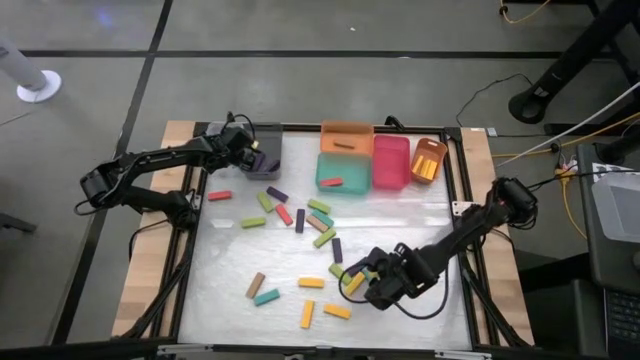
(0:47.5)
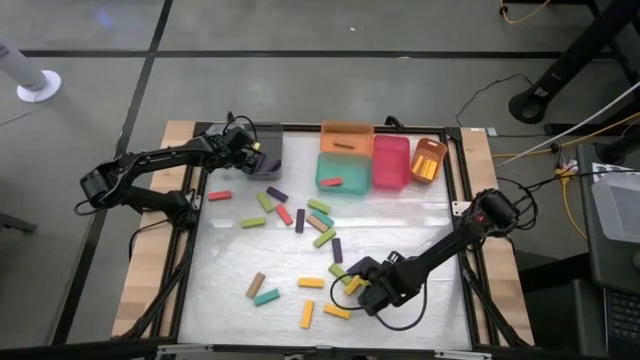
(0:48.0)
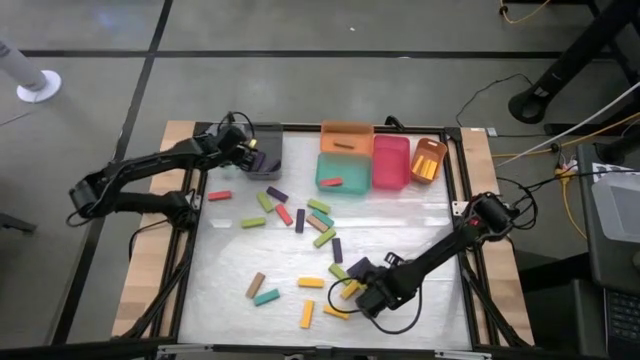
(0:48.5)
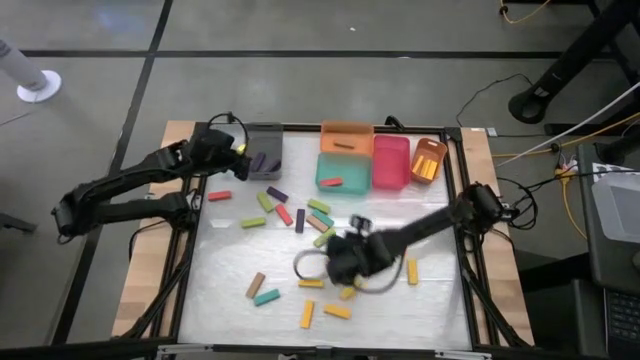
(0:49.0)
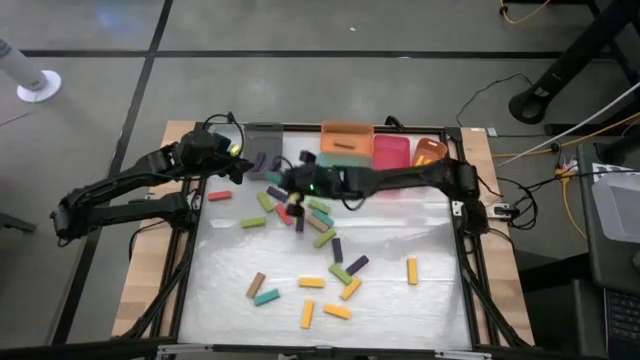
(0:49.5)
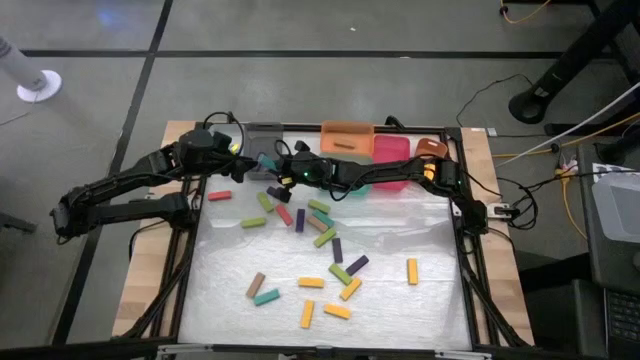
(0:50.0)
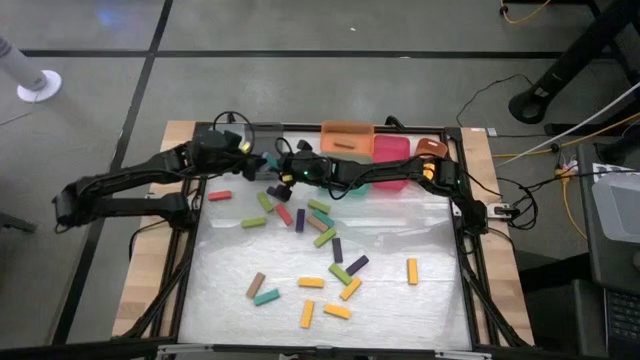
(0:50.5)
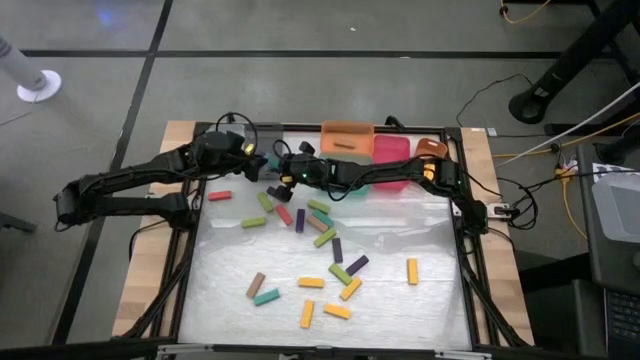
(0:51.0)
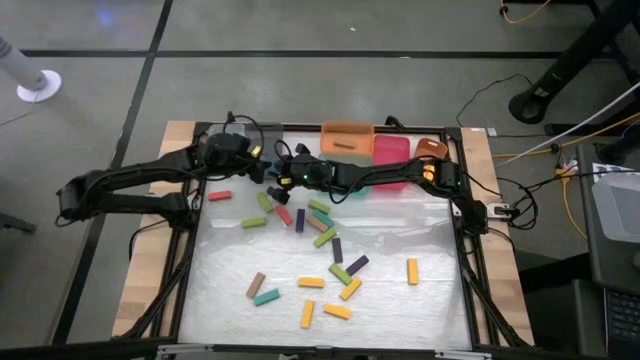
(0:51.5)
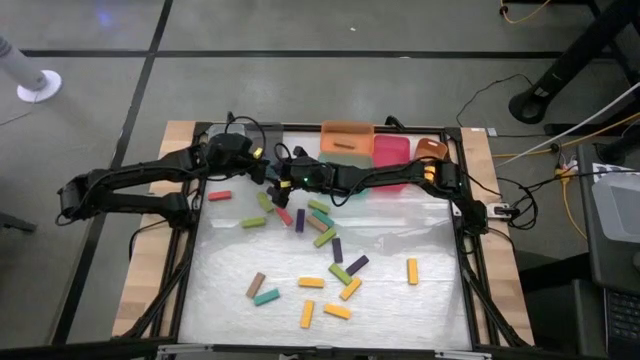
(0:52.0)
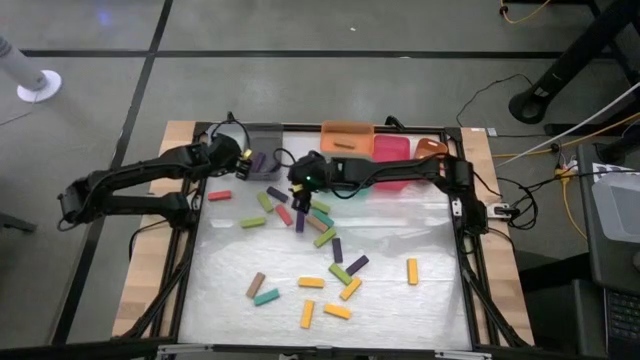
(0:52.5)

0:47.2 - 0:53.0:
Task: Sort blocks
Put the light blue block into the transparent bin

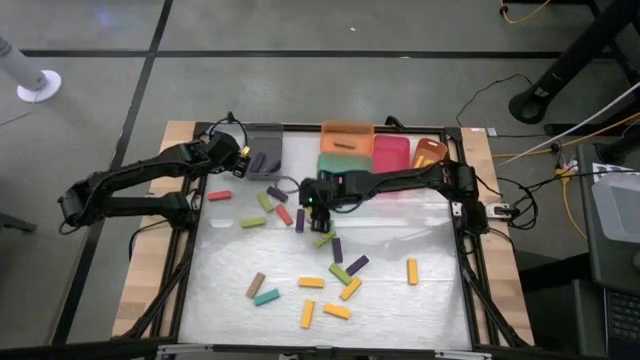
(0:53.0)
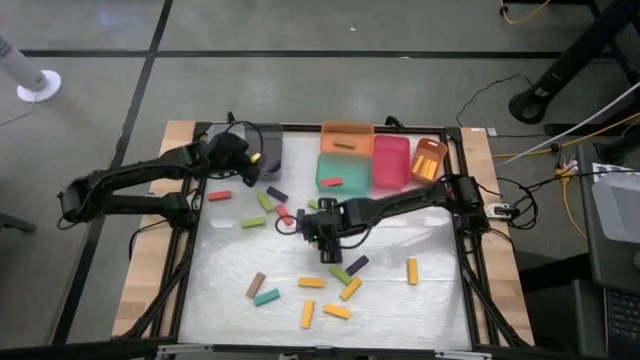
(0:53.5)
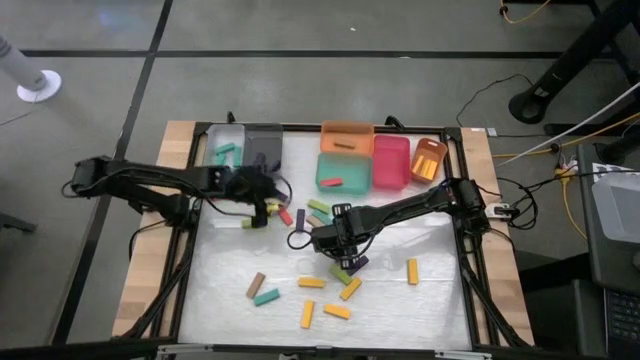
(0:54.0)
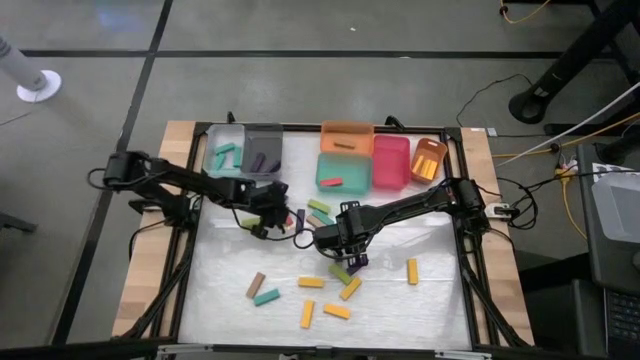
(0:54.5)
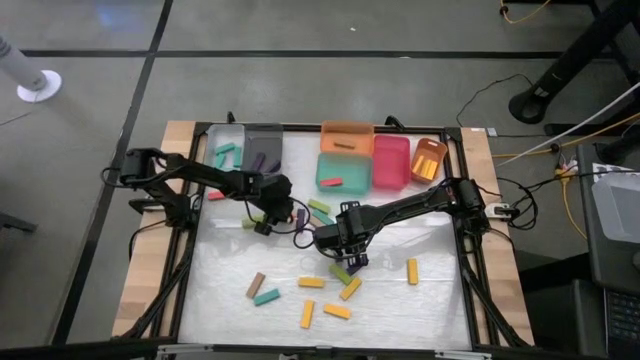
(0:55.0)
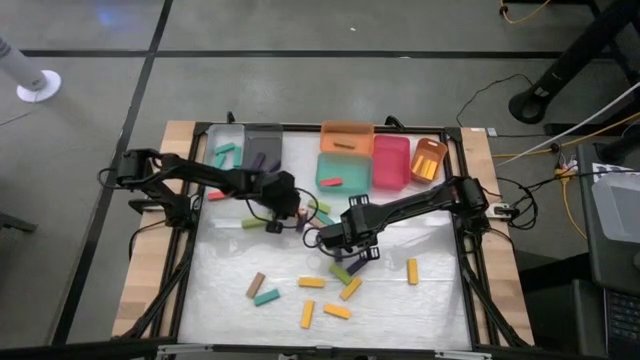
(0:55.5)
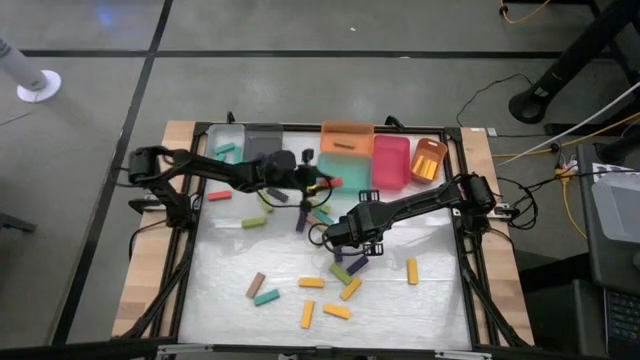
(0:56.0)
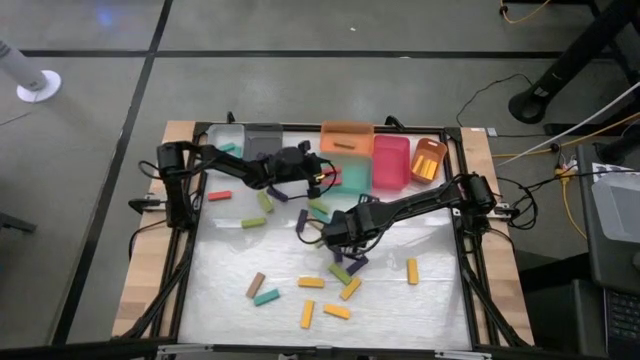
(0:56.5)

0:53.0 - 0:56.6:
Put the orange block into the light blue bin

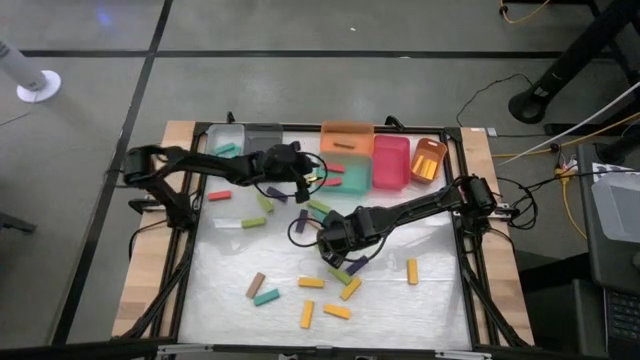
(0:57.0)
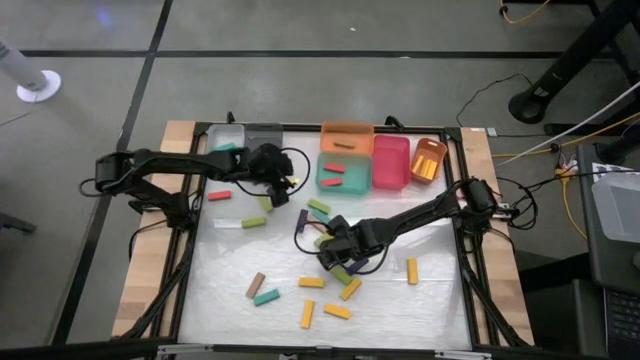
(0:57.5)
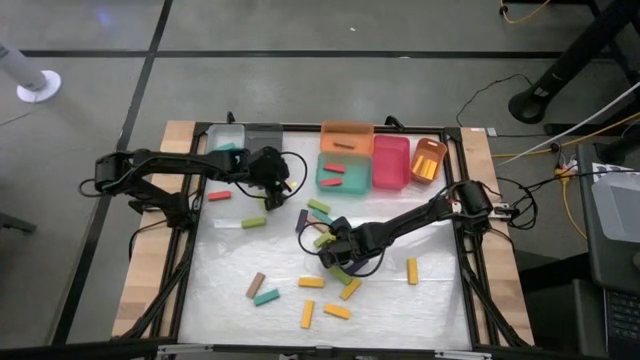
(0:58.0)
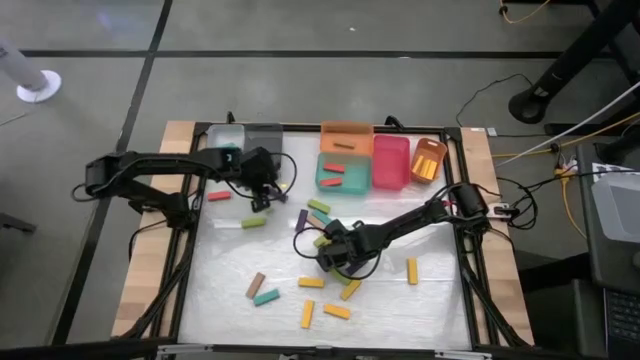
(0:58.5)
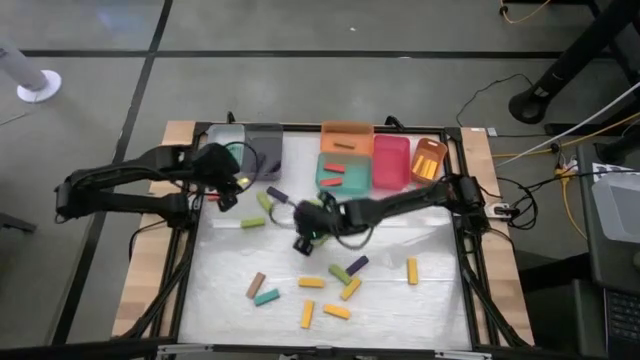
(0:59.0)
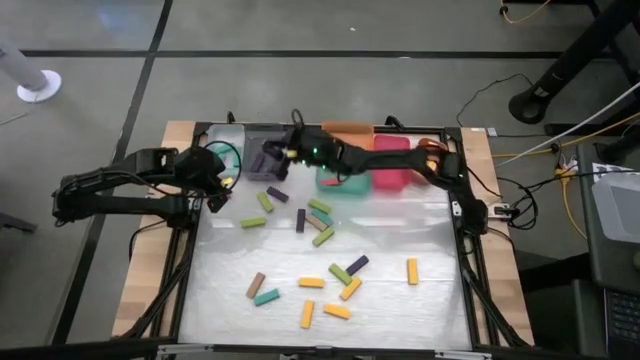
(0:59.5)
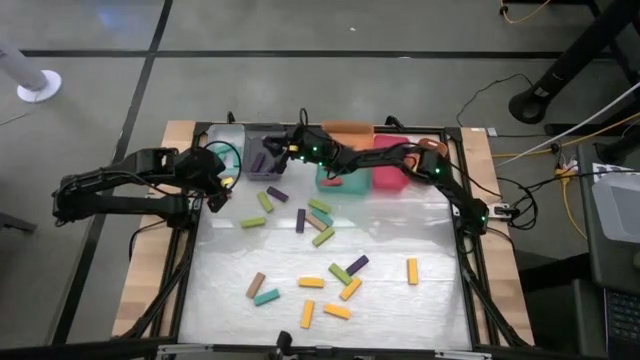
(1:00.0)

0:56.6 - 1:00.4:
Put the violet block into the black bin

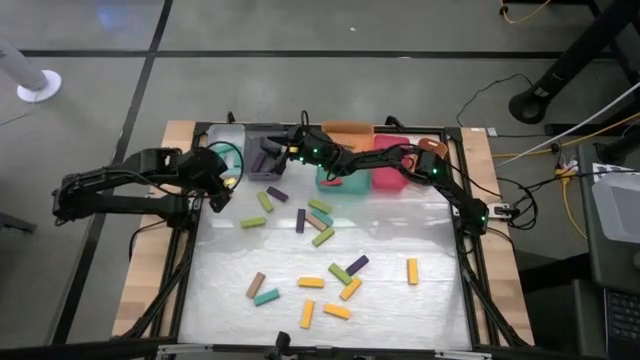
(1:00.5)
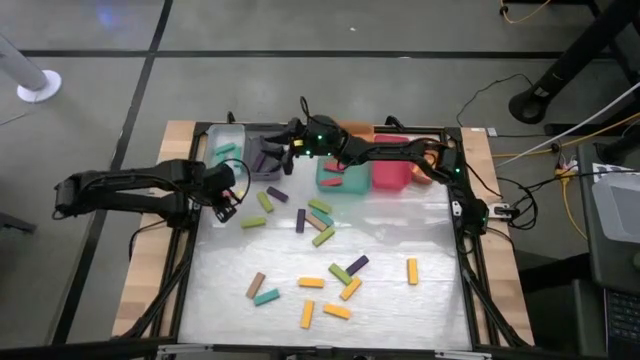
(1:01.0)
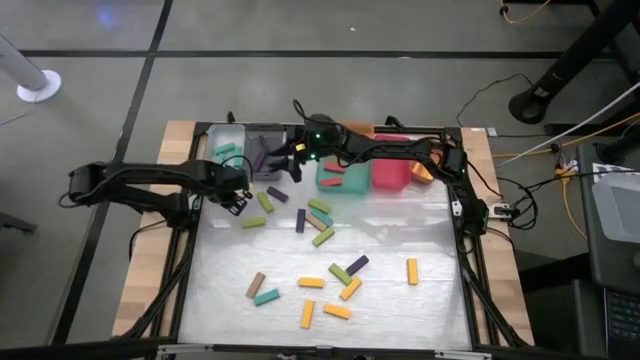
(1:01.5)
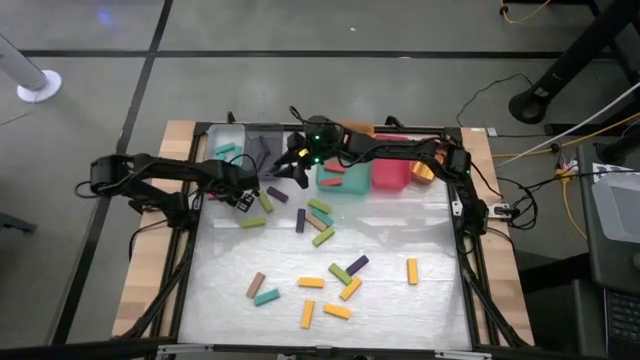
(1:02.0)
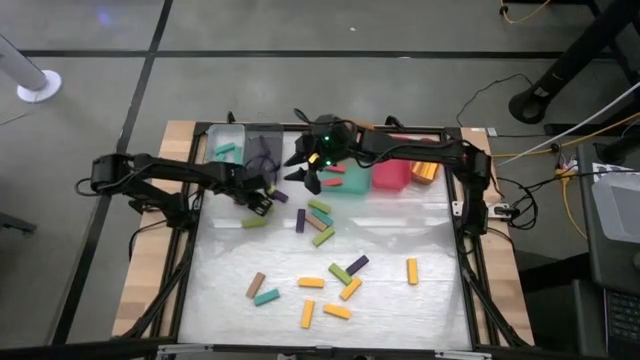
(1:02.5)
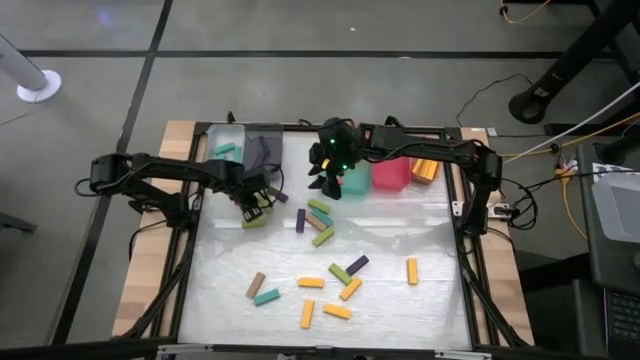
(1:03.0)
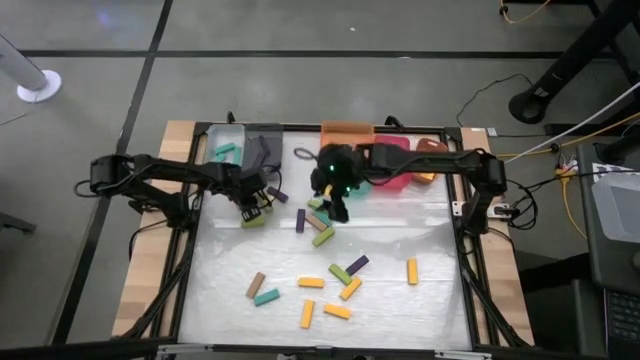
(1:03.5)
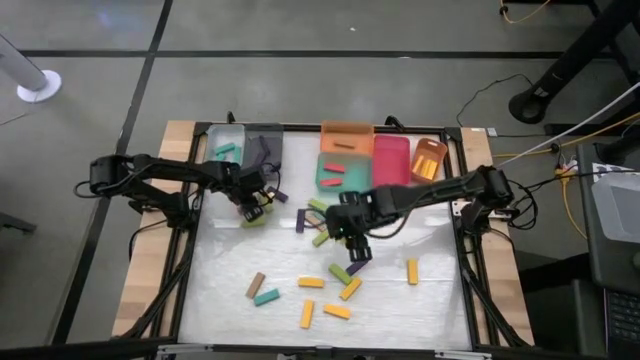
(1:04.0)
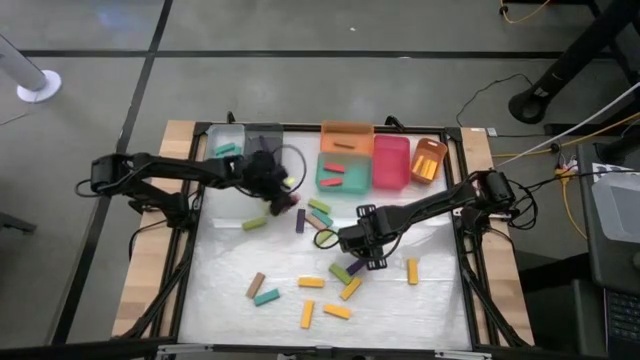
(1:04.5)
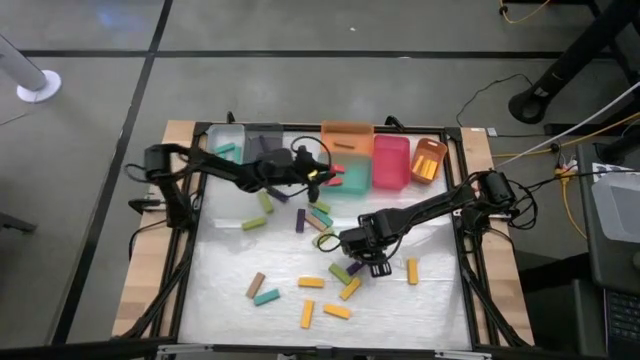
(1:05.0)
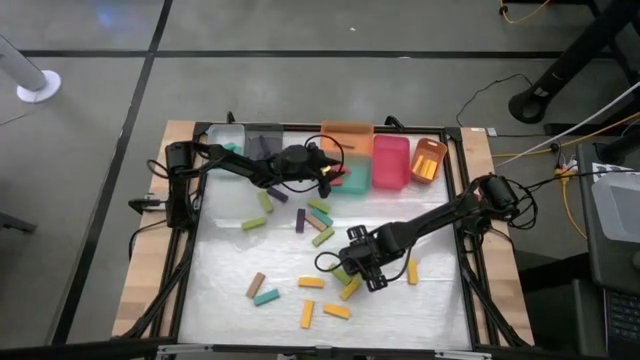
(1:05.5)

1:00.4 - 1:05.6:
Put the orange block into the light blue bin

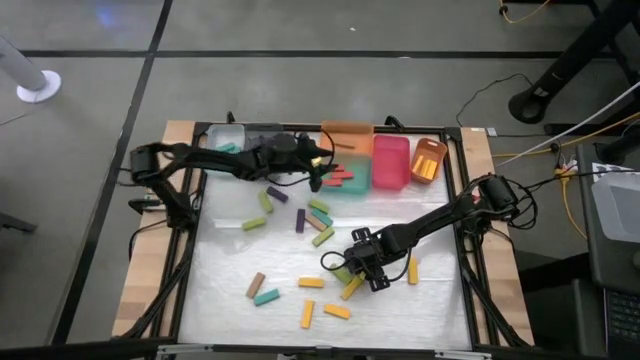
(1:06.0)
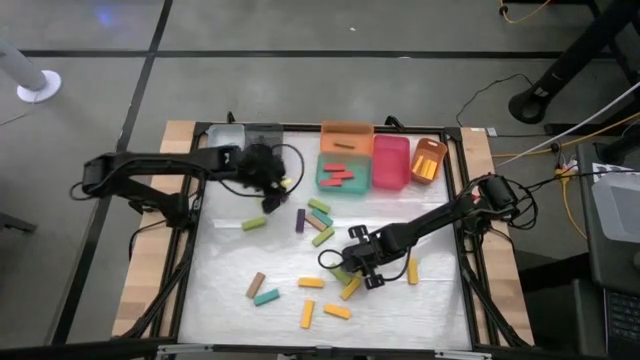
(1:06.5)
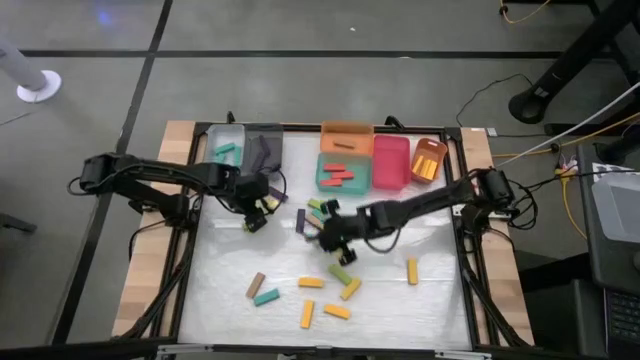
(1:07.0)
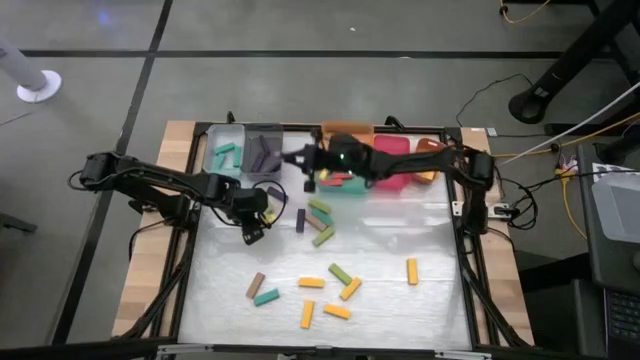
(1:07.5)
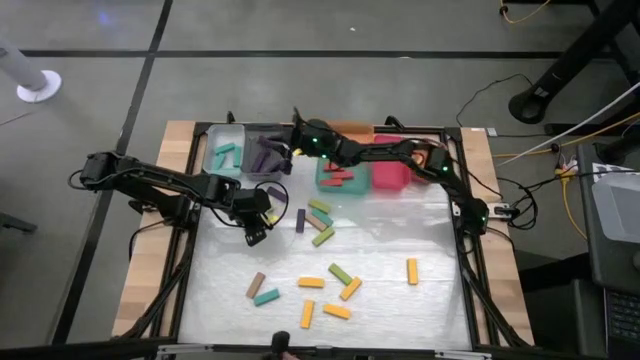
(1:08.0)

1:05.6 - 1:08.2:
Put the violet block into the black bin

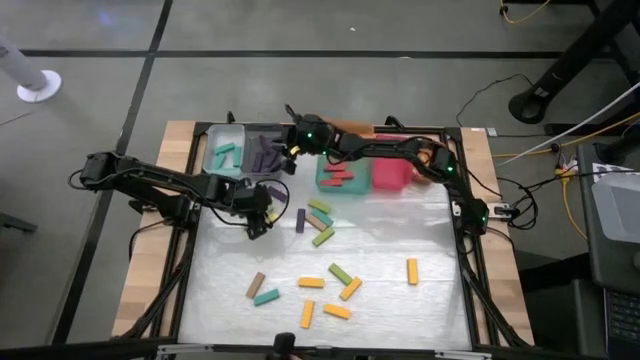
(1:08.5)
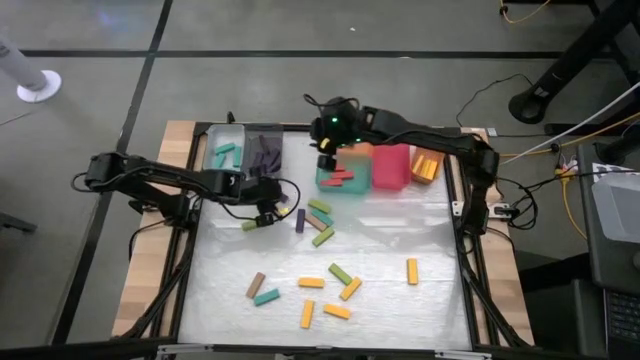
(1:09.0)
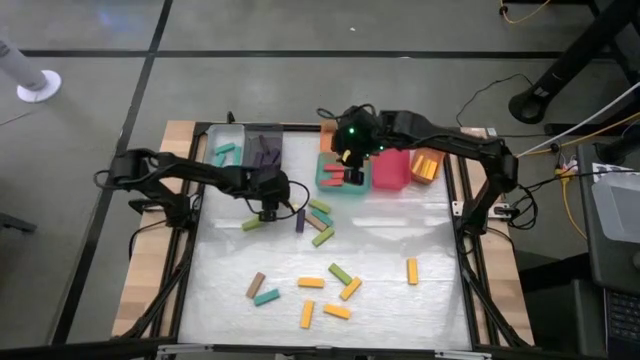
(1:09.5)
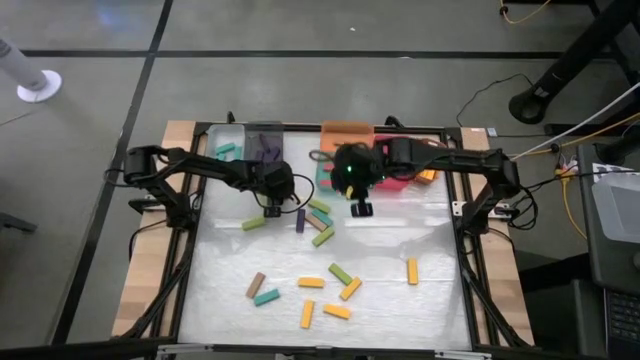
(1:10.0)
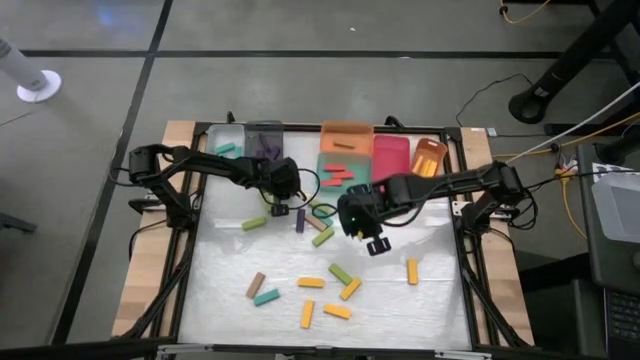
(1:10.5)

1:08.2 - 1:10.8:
Put the violet block into the black bin
